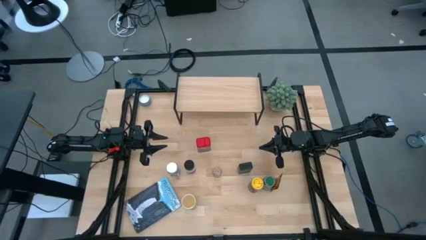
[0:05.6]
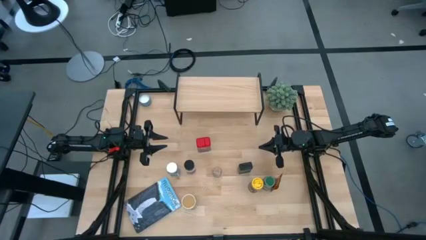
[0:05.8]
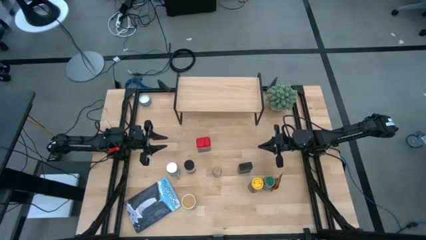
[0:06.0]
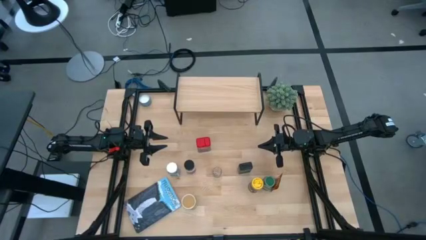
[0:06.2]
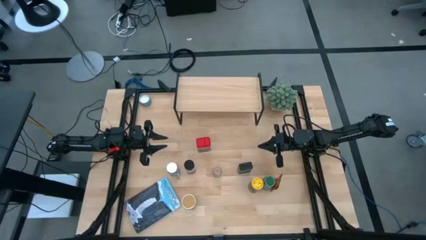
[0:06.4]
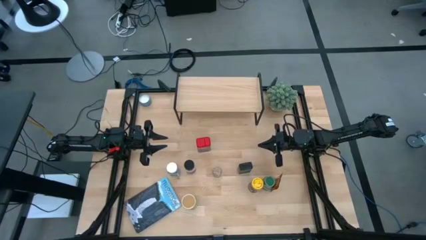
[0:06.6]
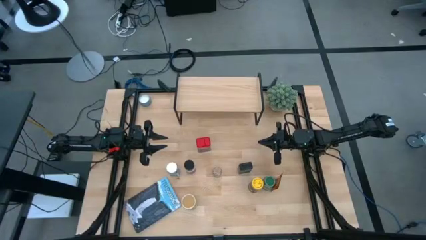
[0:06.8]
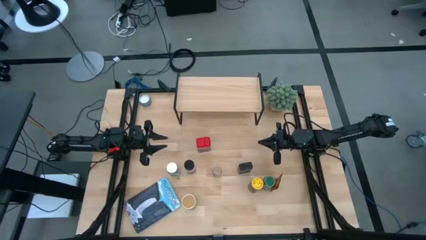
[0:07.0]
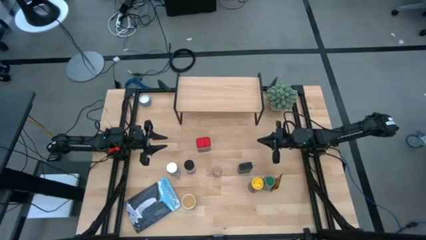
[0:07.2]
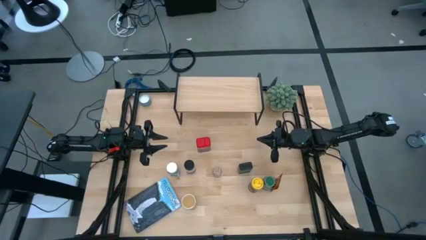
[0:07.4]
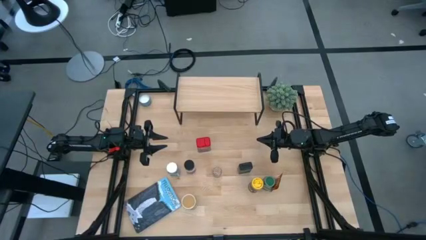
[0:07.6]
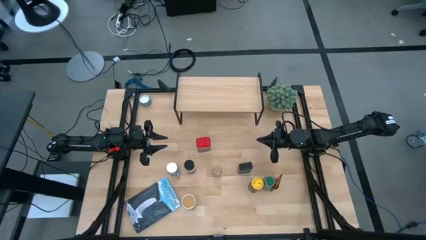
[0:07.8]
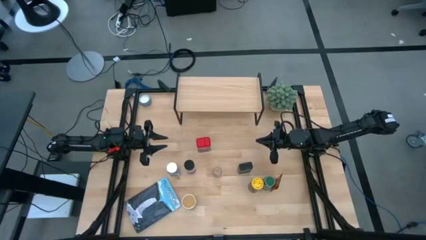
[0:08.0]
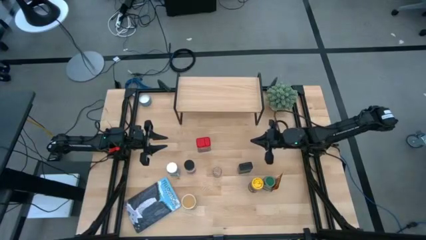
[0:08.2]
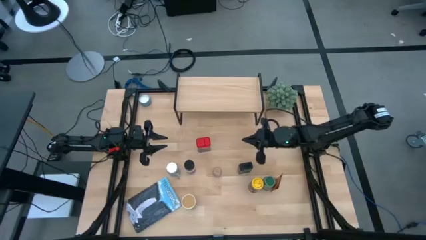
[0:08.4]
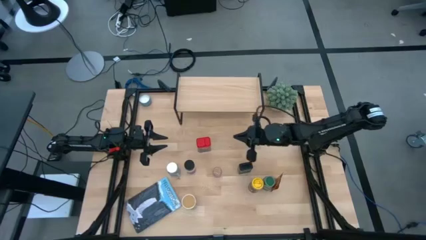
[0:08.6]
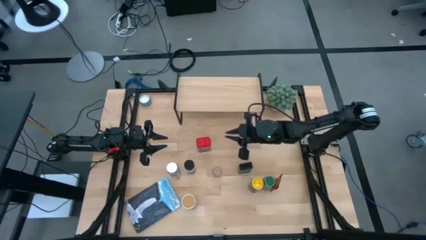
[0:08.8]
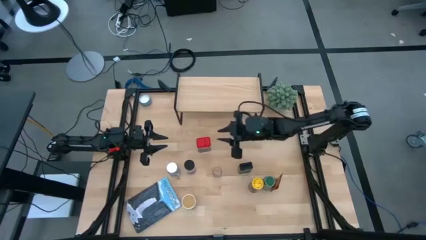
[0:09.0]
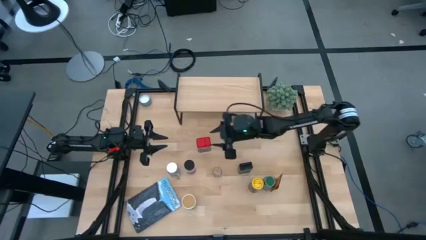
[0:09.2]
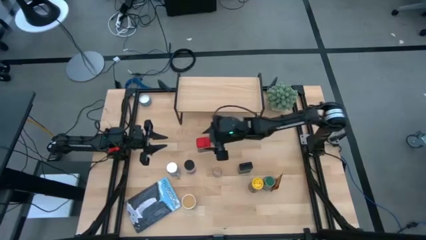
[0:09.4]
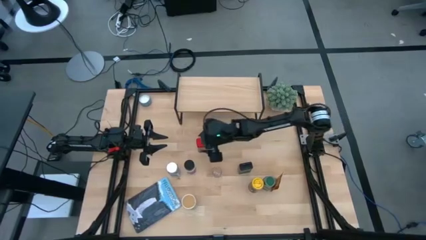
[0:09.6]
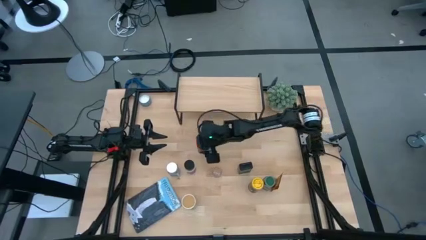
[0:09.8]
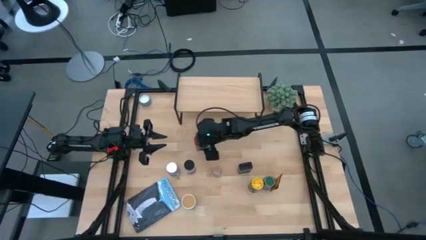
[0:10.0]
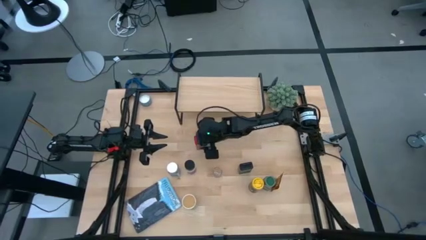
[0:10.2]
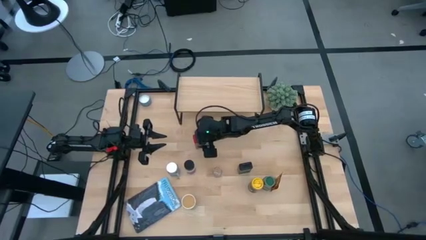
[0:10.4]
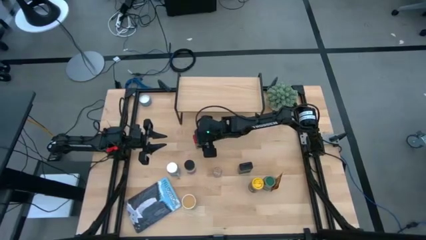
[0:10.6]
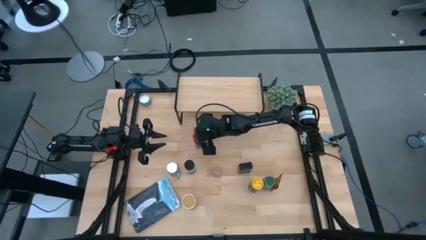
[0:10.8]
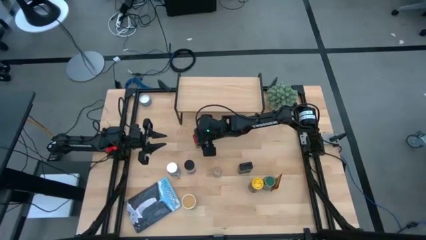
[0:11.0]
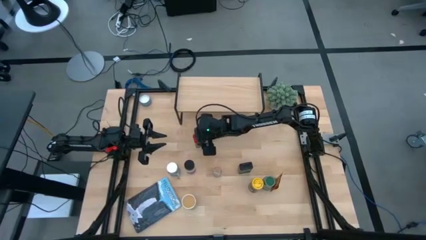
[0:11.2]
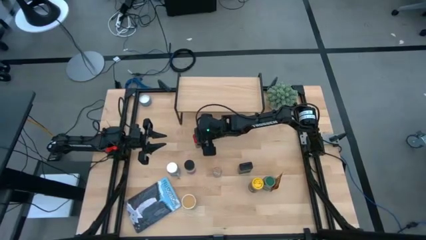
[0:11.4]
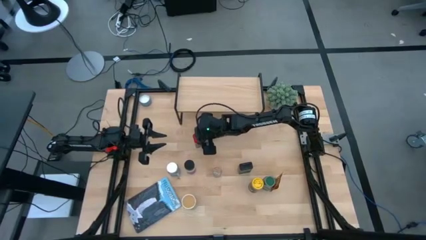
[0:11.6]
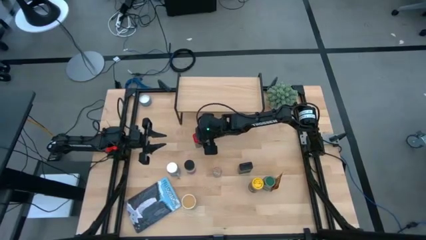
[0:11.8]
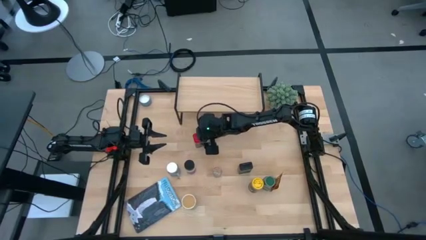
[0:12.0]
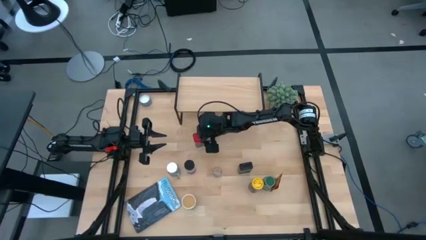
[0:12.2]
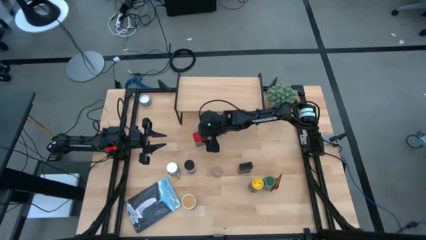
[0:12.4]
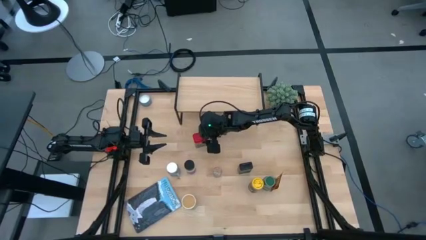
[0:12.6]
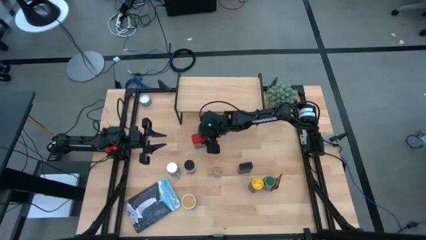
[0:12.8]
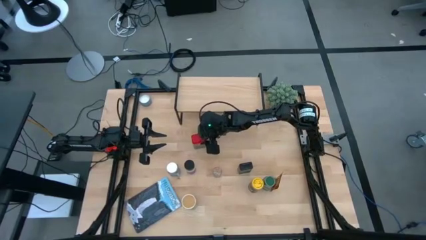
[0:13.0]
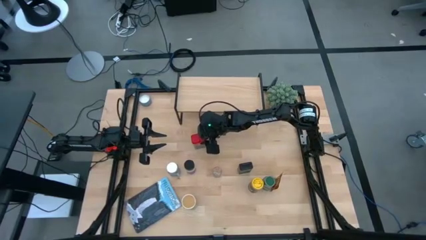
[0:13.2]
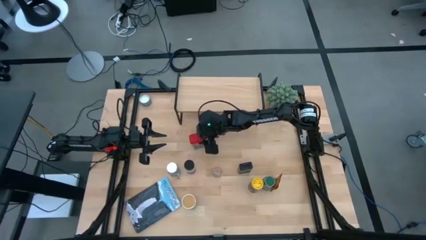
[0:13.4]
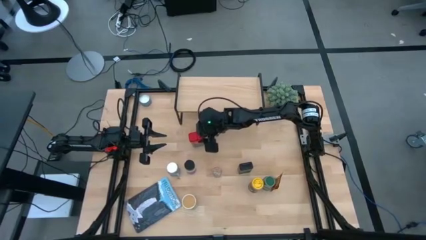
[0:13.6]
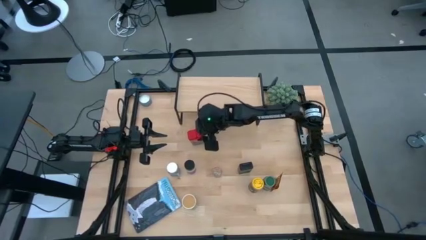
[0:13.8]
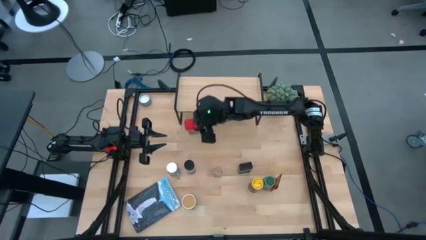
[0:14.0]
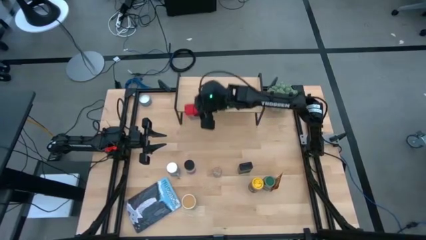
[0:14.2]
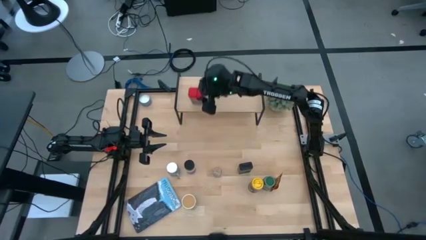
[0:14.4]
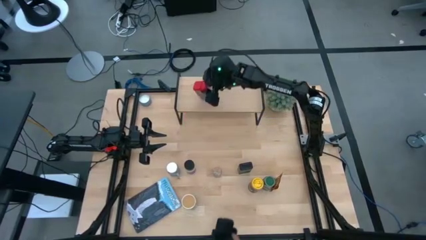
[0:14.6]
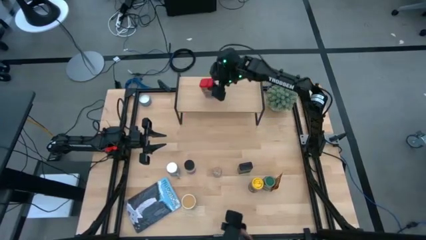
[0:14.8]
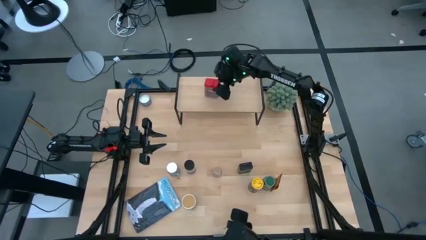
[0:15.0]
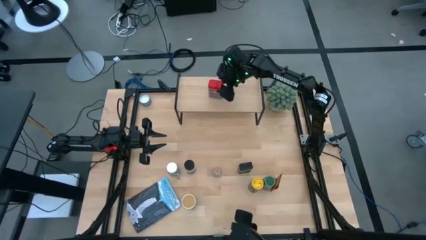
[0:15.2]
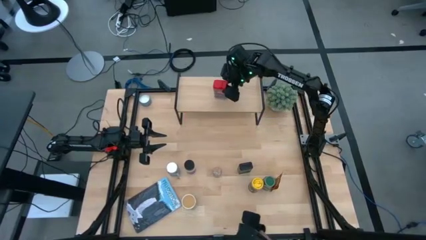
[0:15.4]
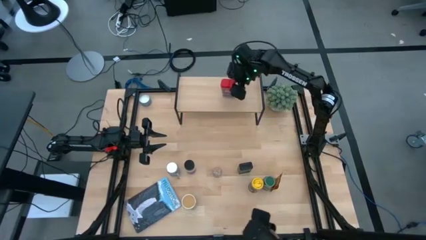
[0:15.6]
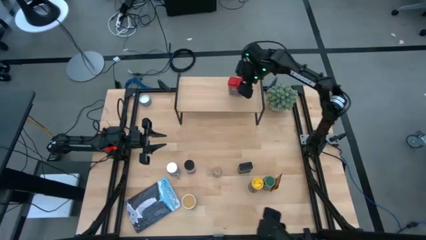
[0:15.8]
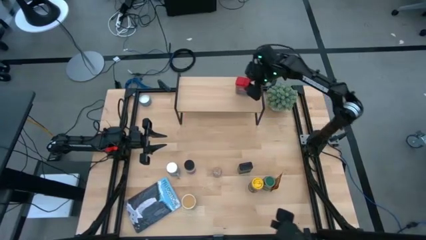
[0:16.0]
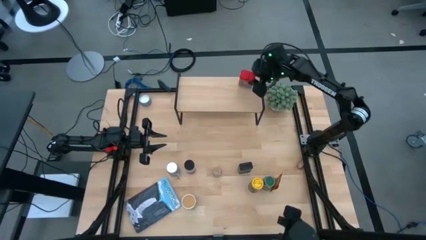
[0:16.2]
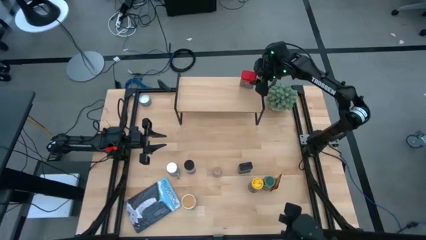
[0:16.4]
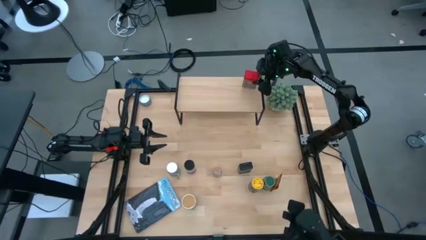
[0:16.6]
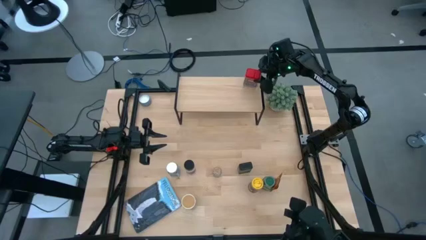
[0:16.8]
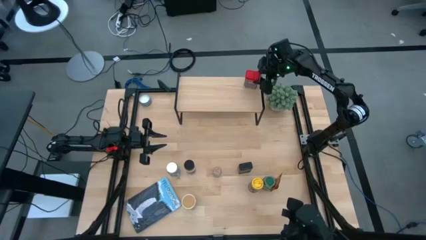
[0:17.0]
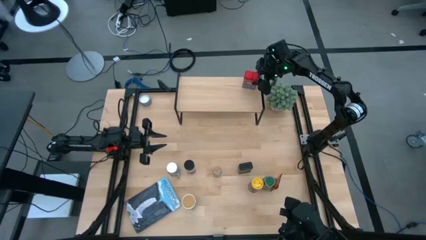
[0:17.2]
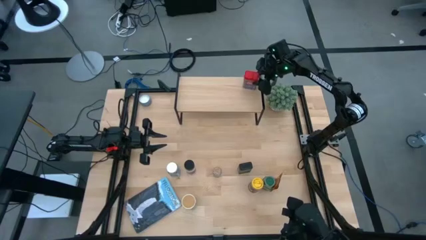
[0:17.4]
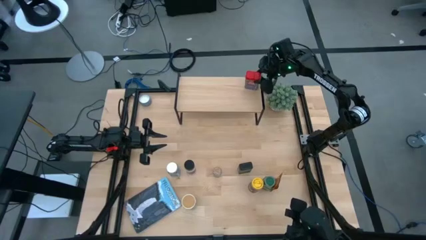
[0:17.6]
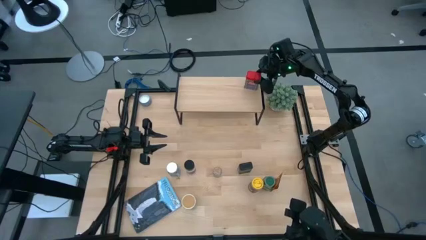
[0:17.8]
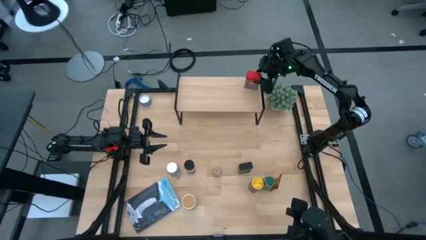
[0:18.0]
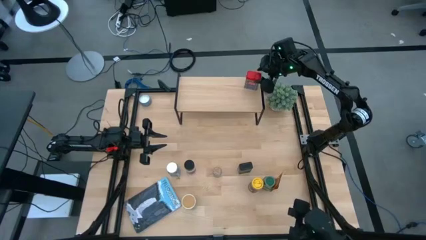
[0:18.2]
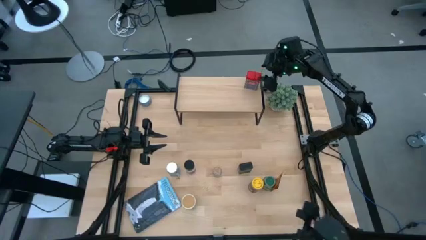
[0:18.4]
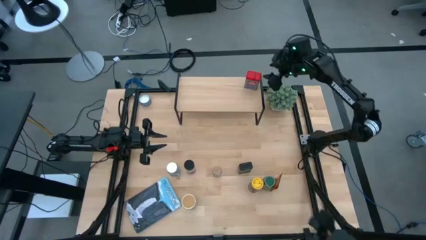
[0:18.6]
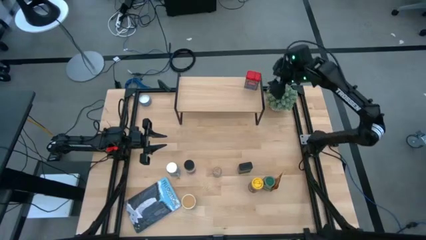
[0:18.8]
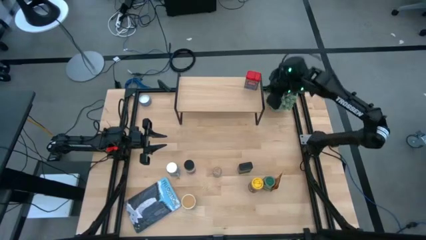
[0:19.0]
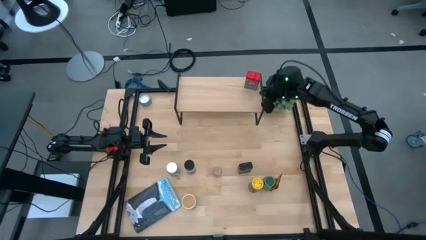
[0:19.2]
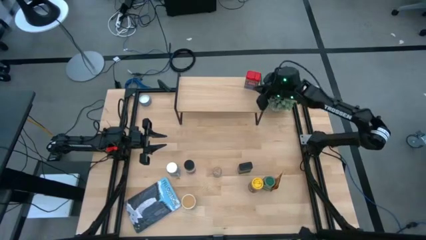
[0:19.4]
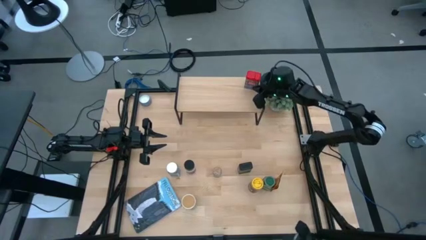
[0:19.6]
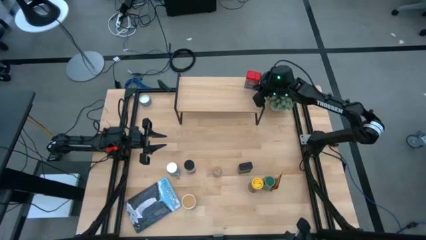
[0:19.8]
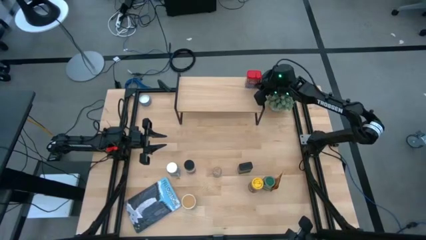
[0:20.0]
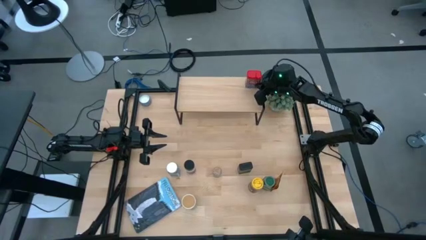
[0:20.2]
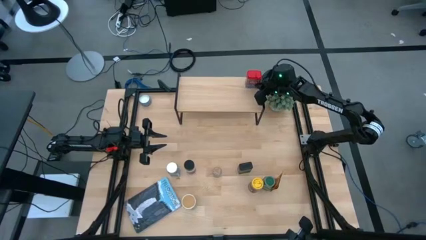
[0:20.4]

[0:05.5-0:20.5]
Task: Shelf spices
Put the red seasoning cans on the shelf

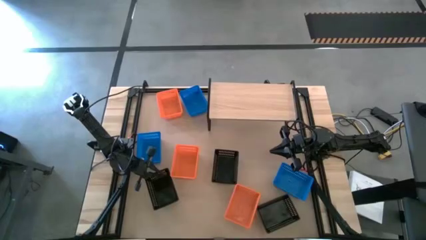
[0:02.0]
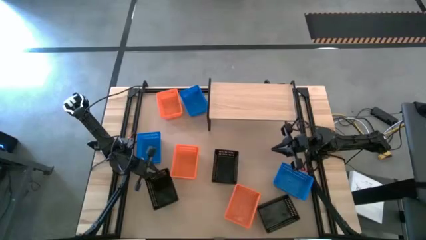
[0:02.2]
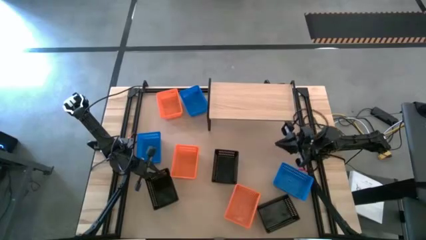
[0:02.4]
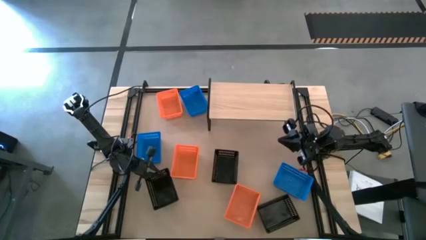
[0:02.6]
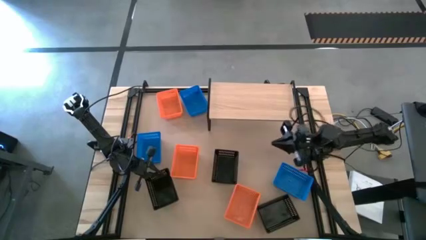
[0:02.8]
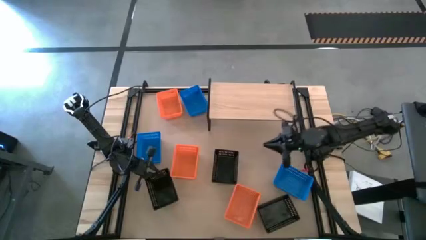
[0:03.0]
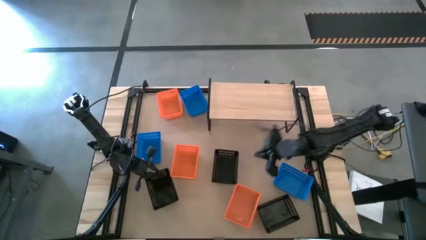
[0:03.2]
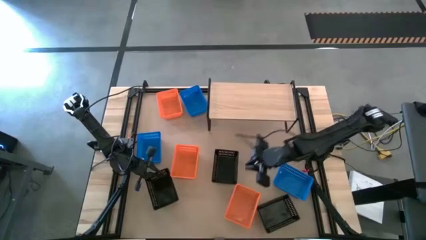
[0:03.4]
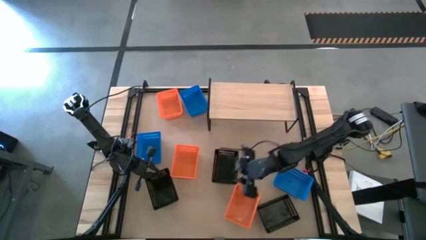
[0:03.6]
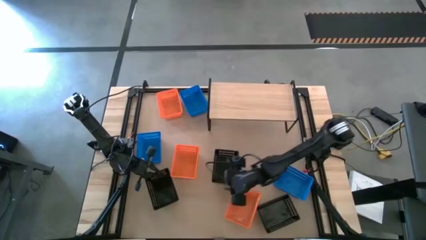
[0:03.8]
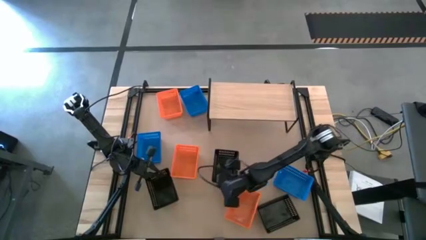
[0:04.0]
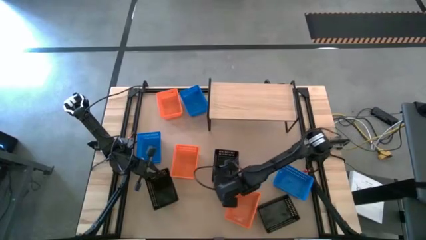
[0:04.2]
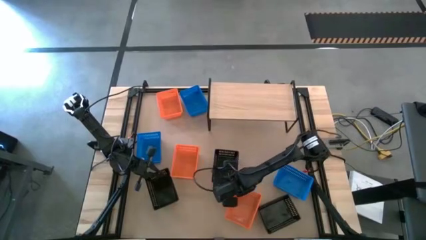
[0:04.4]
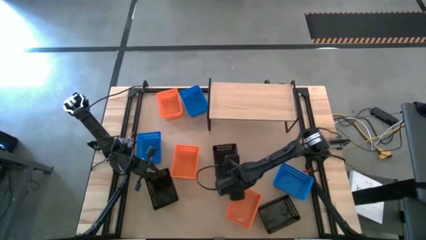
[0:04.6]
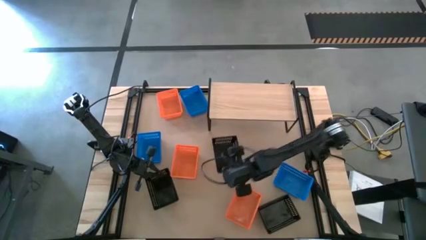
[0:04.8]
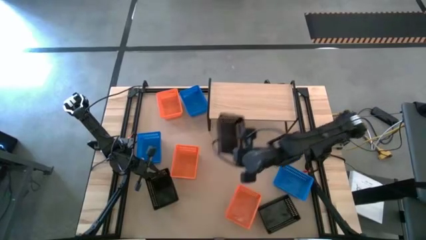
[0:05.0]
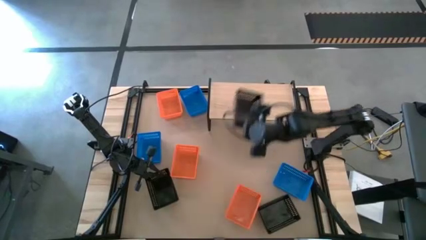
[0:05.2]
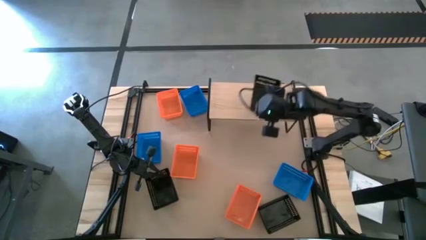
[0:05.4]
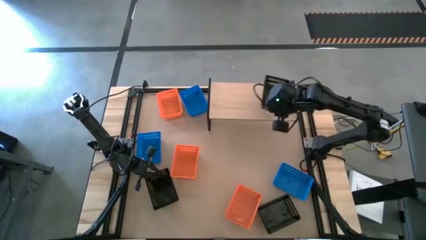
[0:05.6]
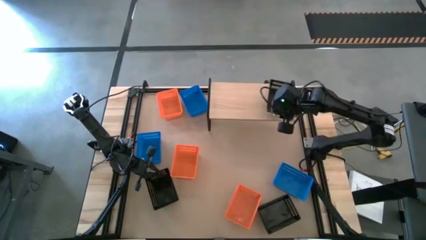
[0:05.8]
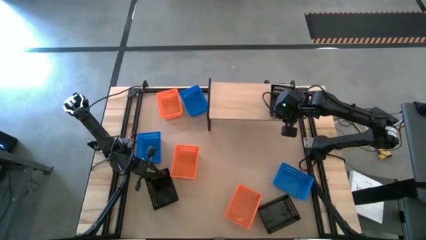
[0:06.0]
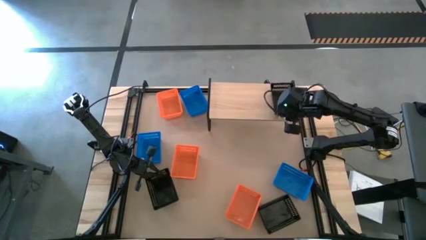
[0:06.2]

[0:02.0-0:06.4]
Task: Stack baskets on shelf by color
Put the center black bin on the shelf
